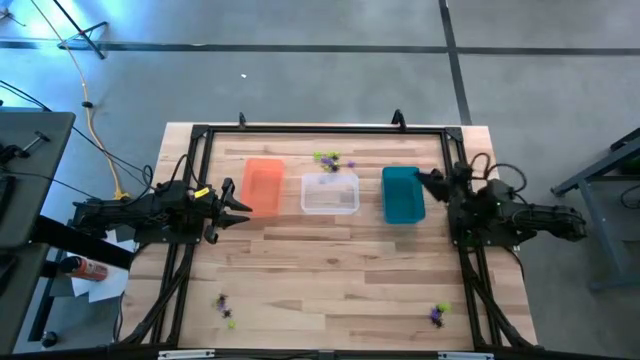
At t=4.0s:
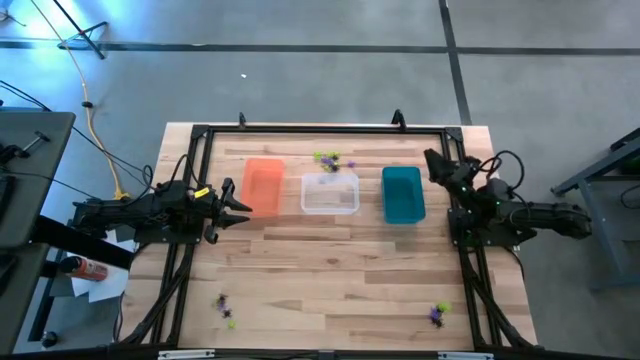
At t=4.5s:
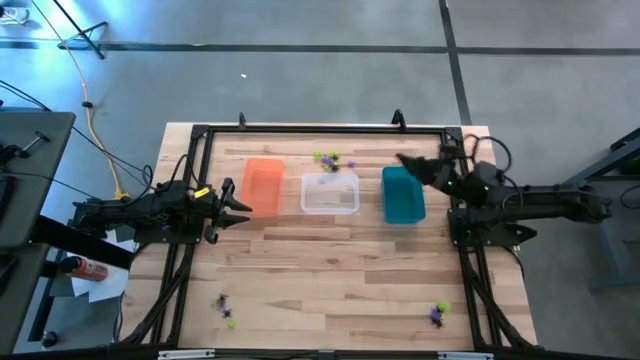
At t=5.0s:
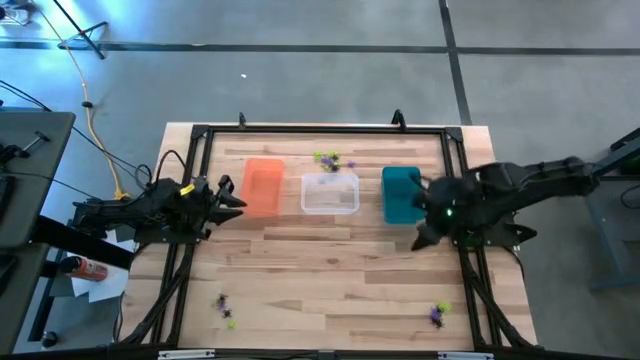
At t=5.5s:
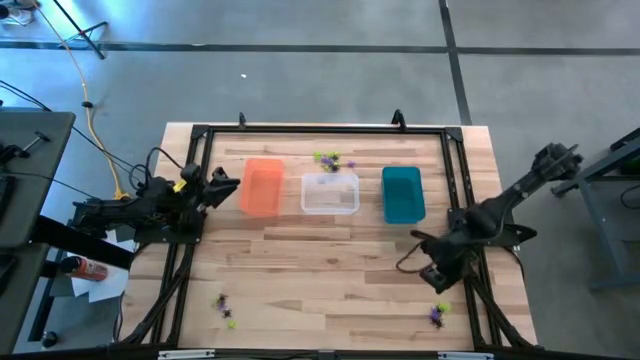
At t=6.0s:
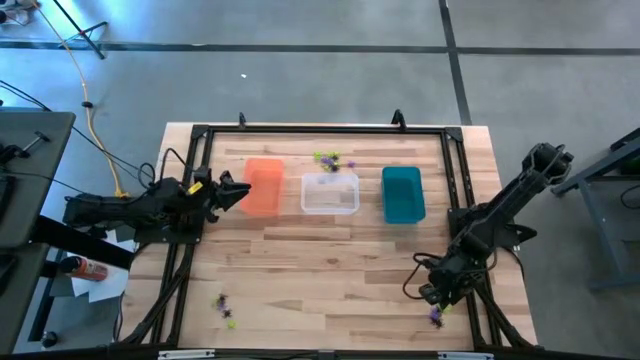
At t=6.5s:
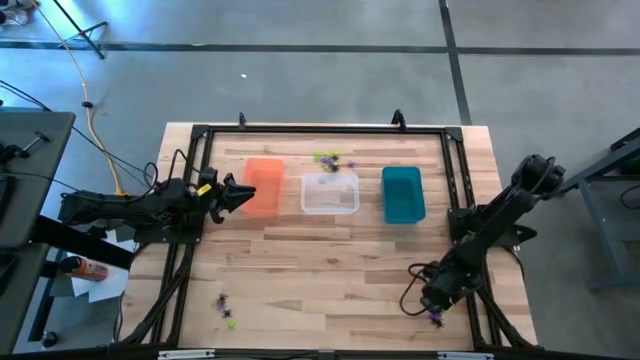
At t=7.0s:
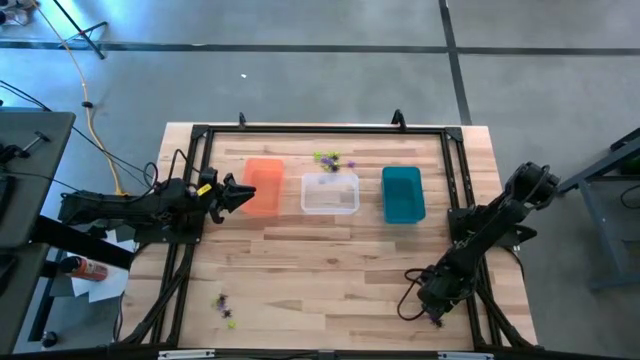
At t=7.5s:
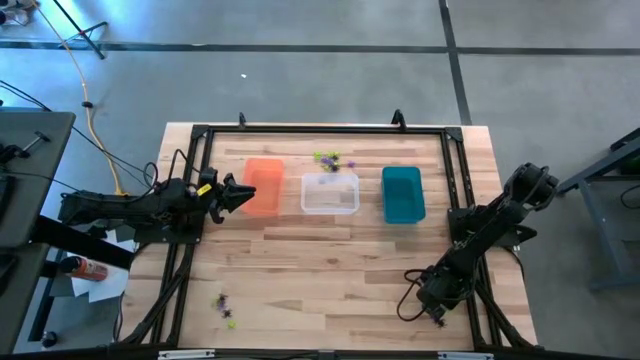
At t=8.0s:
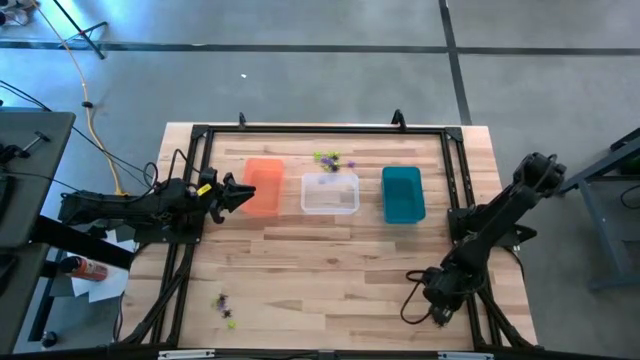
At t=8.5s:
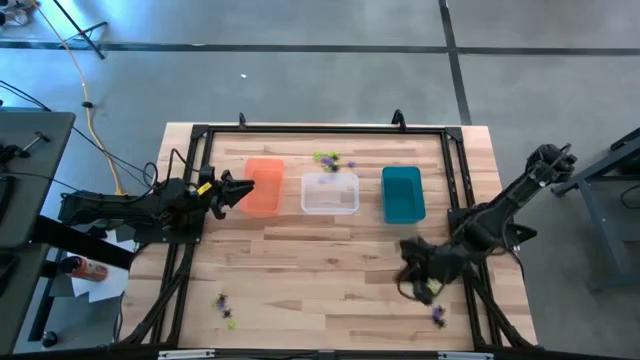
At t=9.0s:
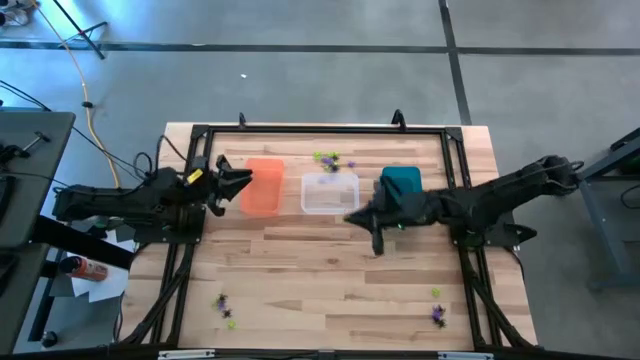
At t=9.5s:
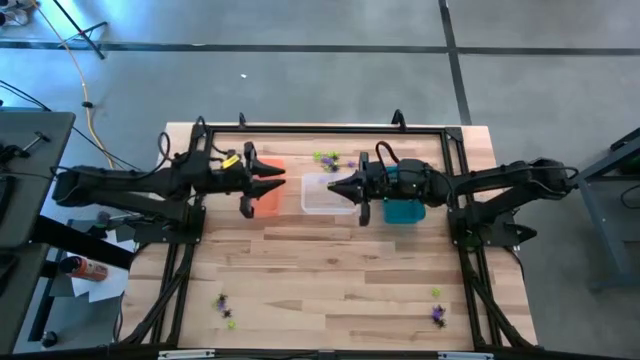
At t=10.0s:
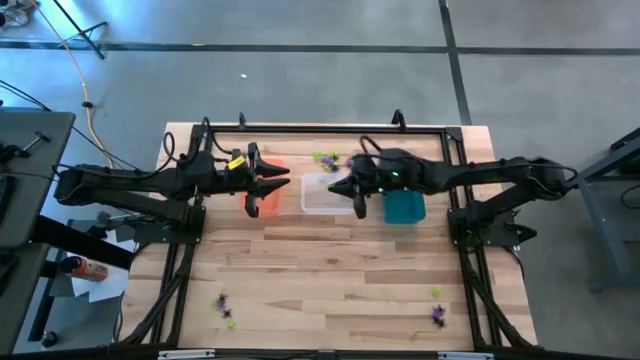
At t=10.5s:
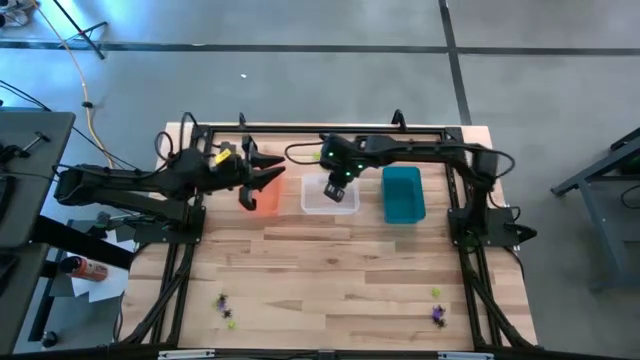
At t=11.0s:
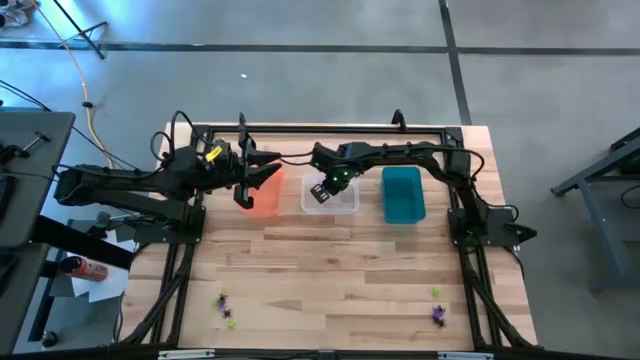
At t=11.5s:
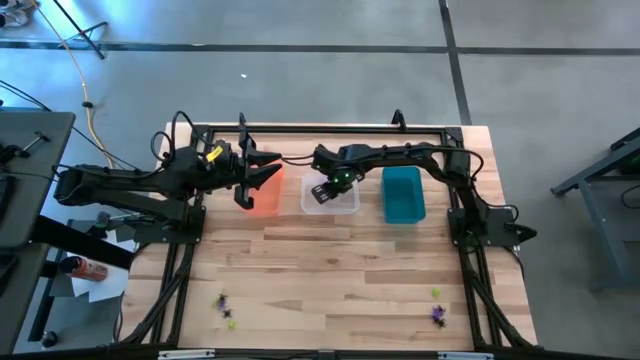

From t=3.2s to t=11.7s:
Task: Sort Halloween decoration
Put the green spider toy into the transparent bin

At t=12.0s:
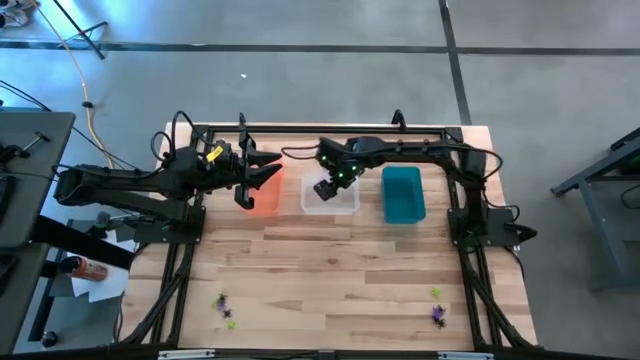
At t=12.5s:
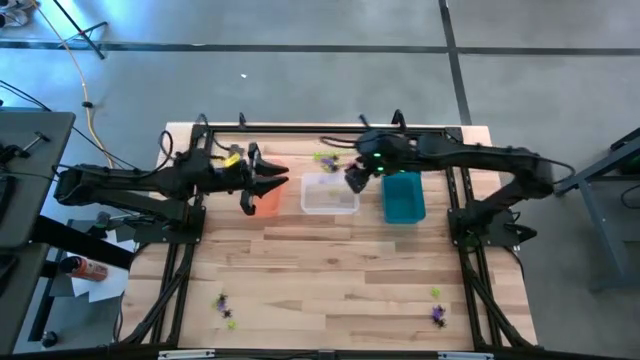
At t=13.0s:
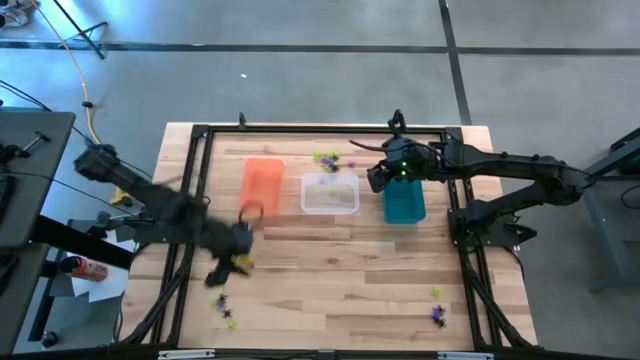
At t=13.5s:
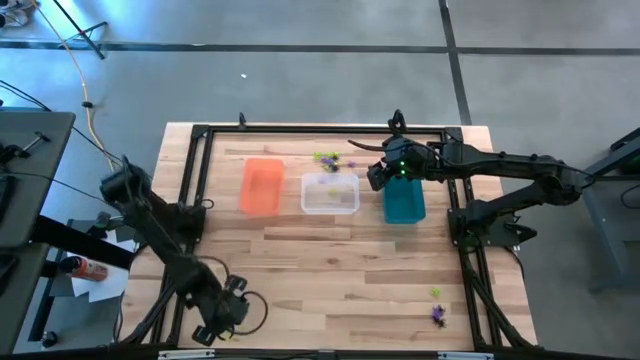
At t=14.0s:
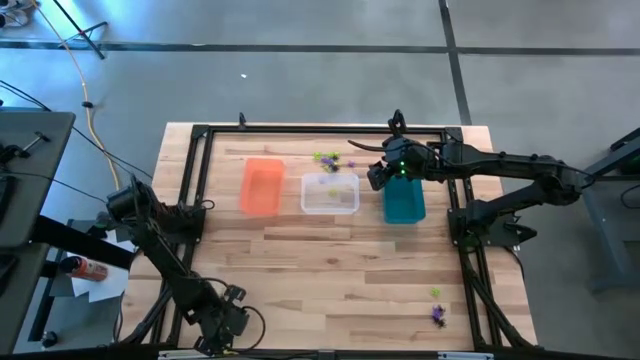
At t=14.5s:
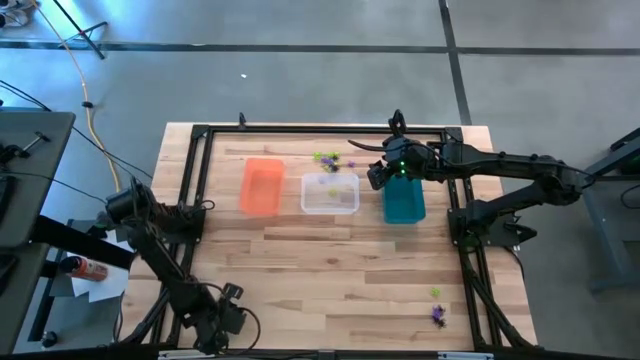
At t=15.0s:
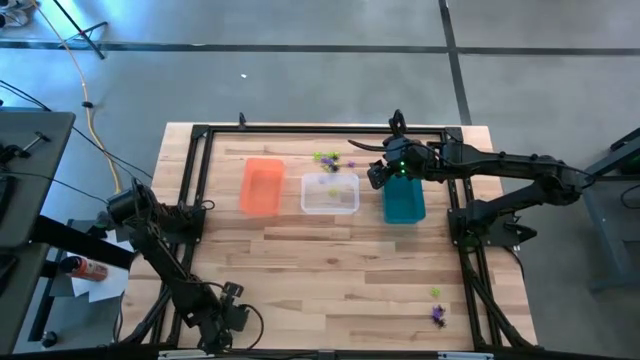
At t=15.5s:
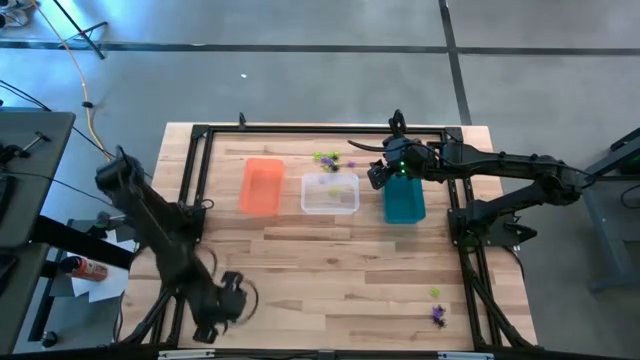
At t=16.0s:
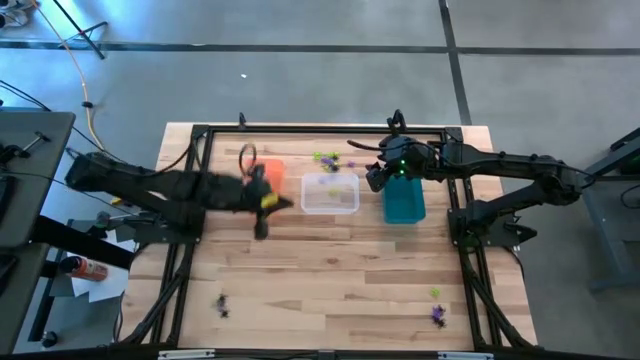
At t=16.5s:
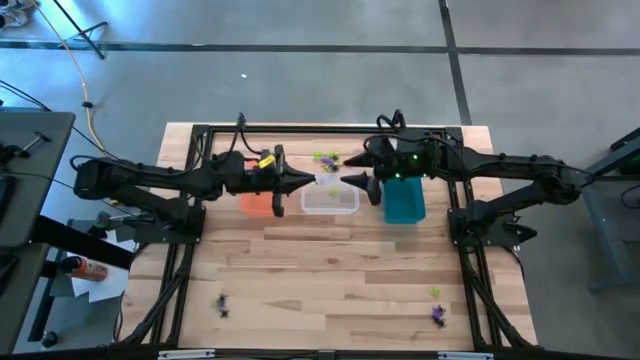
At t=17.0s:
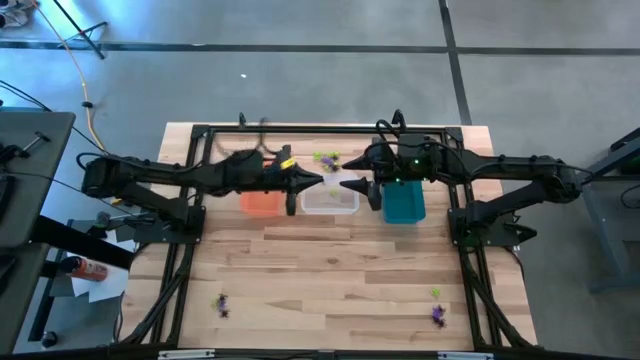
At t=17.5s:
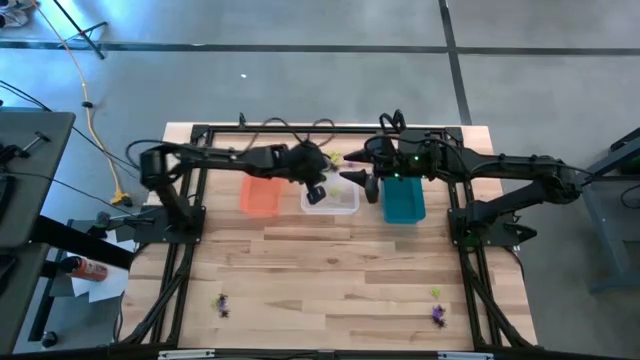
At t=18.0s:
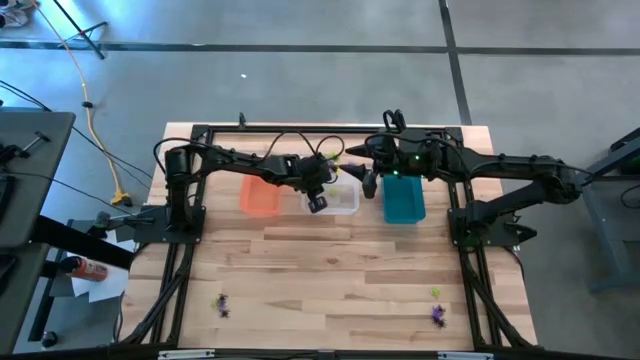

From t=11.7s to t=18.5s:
Put the green spider toy into the transparent bin

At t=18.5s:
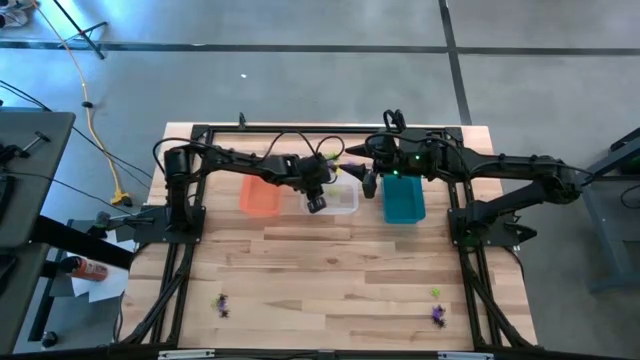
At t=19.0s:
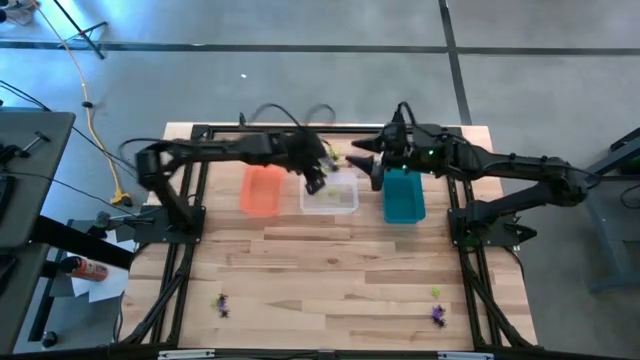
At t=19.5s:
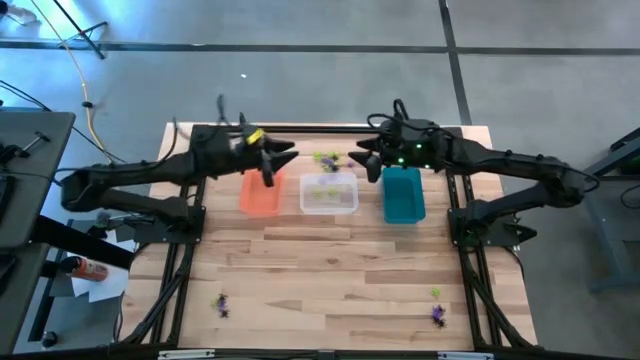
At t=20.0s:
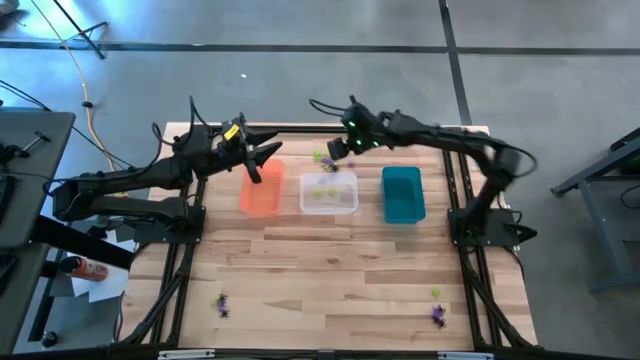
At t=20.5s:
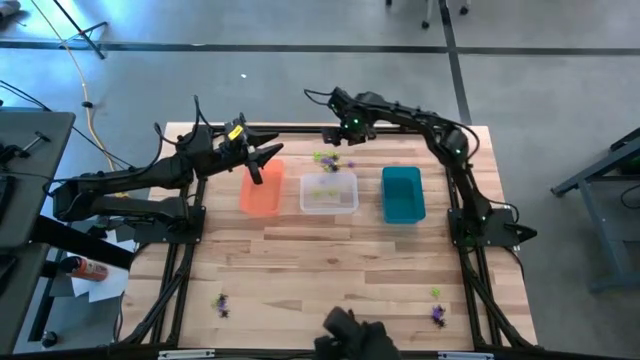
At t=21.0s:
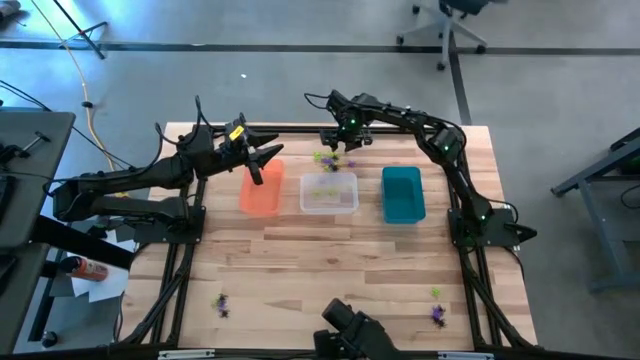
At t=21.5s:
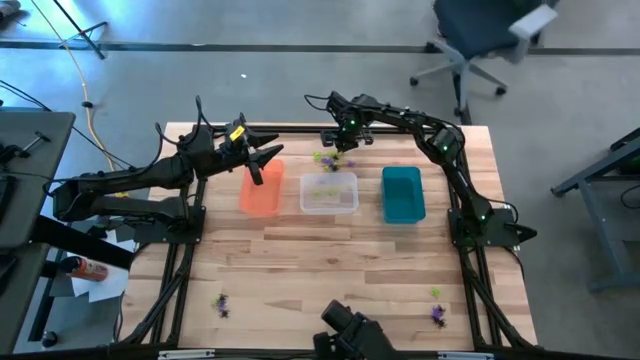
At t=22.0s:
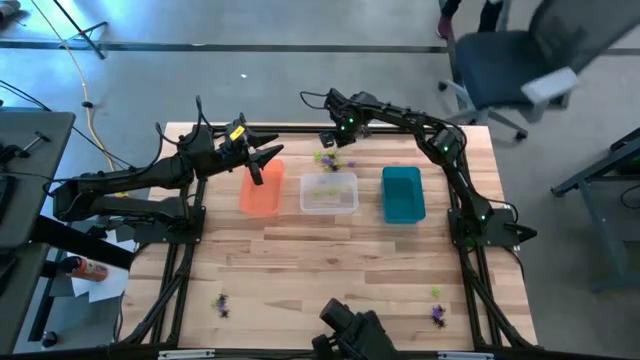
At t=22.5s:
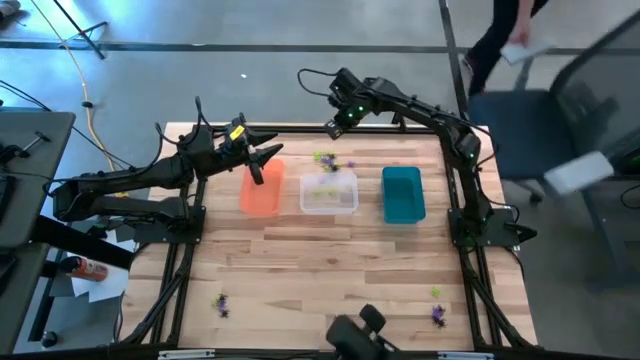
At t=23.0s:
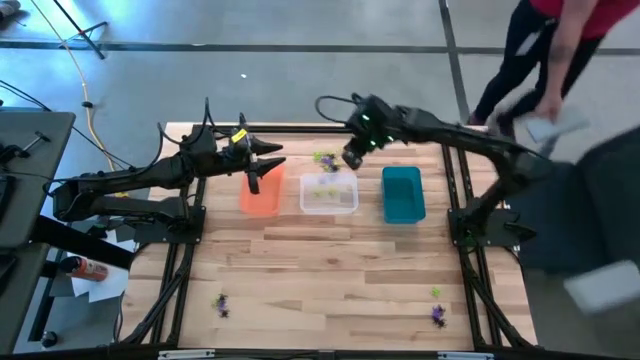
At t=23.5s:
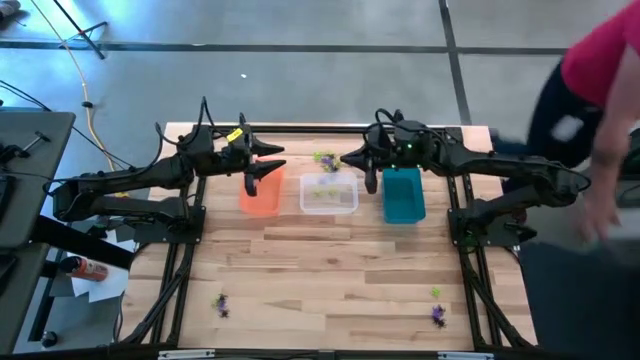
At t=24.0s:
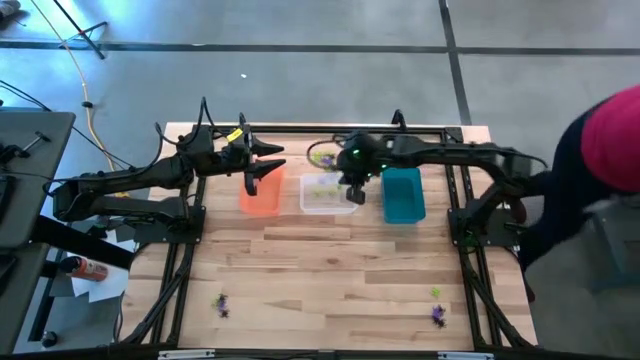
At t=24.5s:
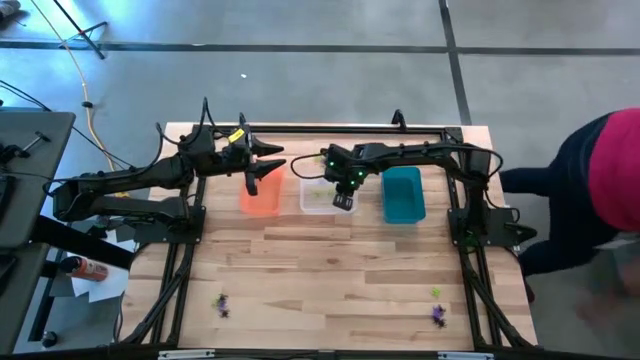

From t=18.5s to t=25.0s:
Put the green spider toy into the transparent bin
